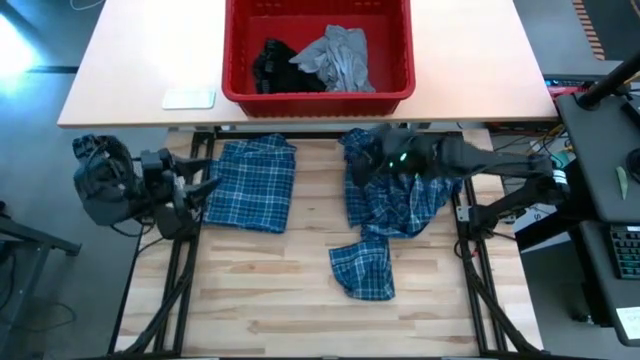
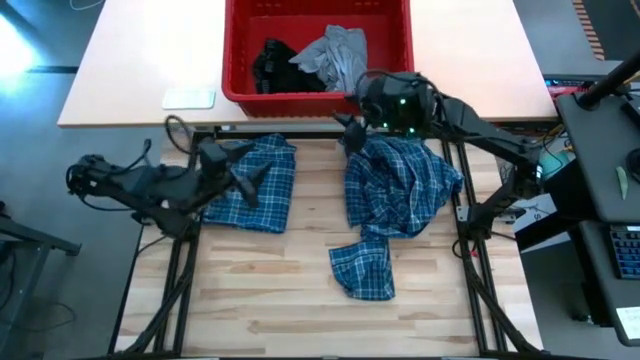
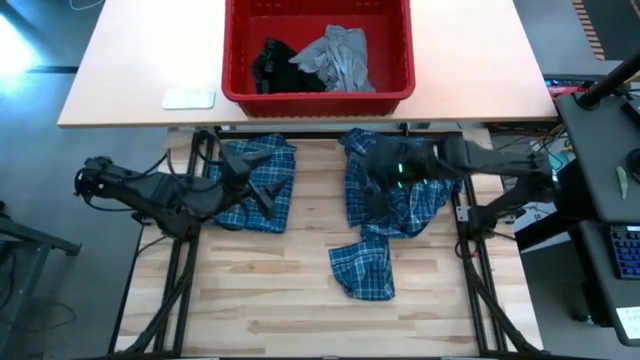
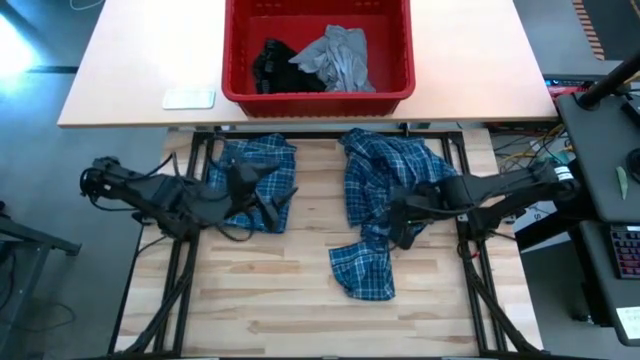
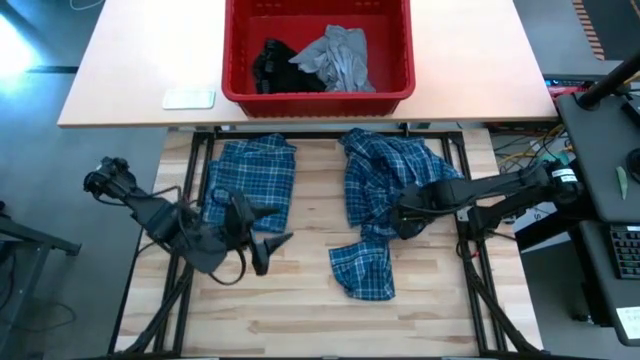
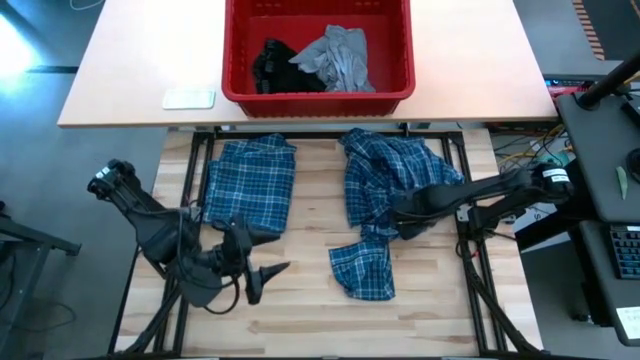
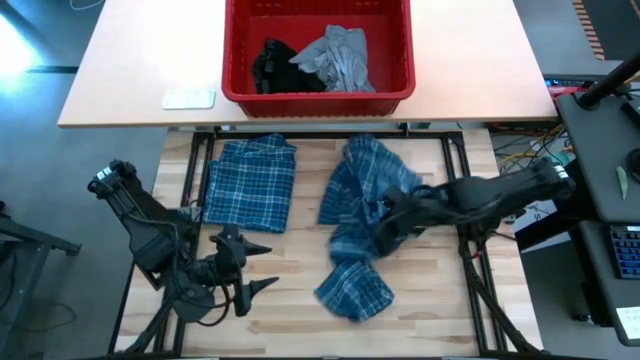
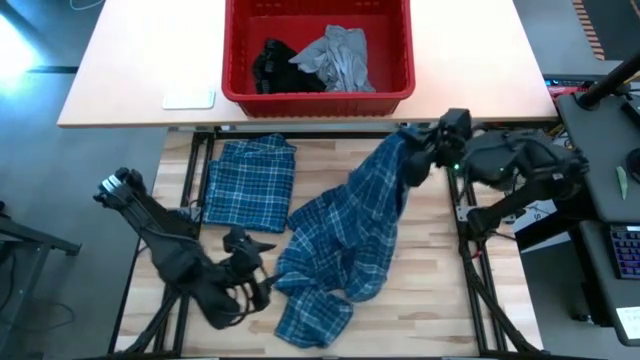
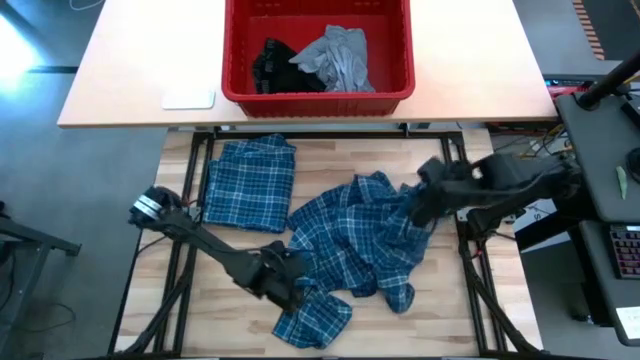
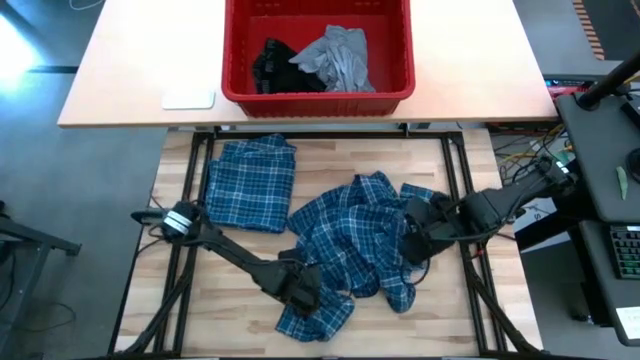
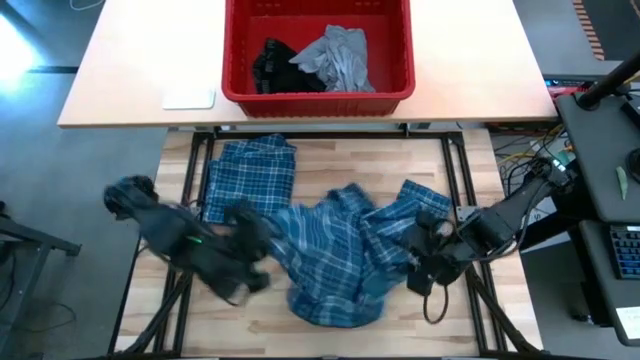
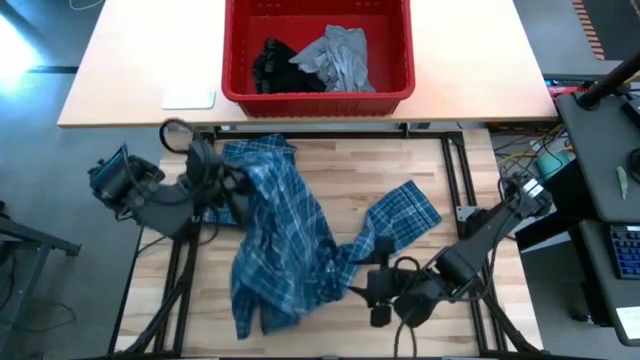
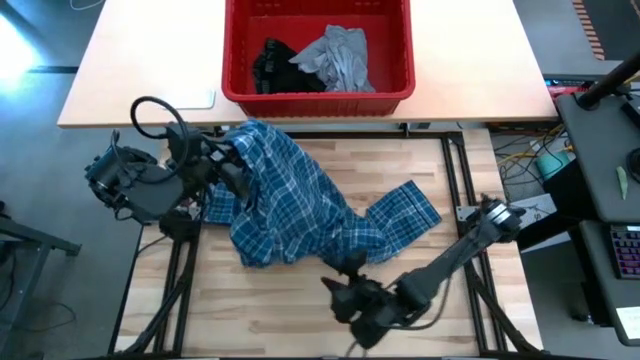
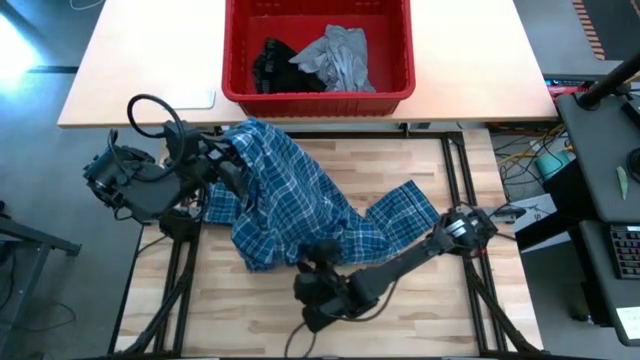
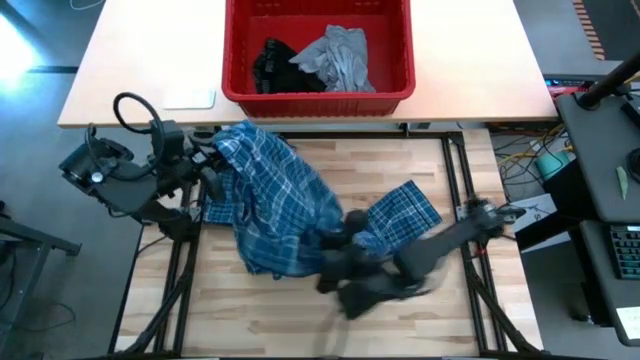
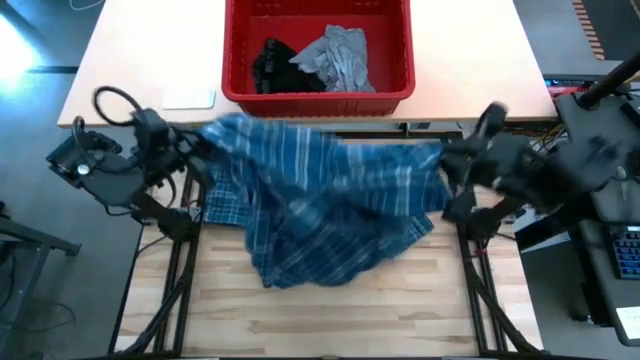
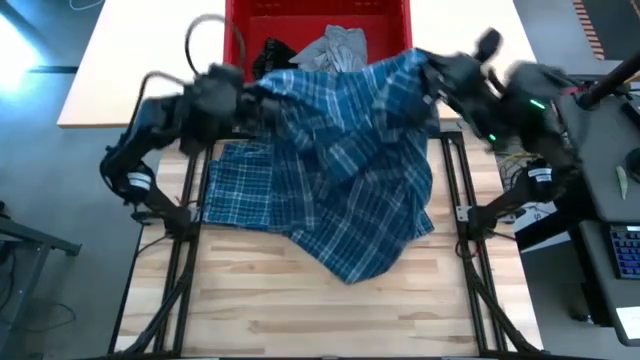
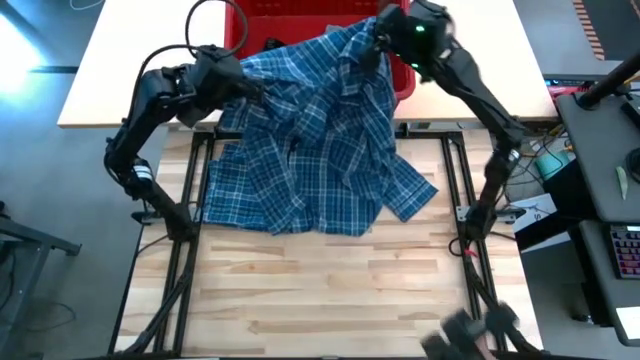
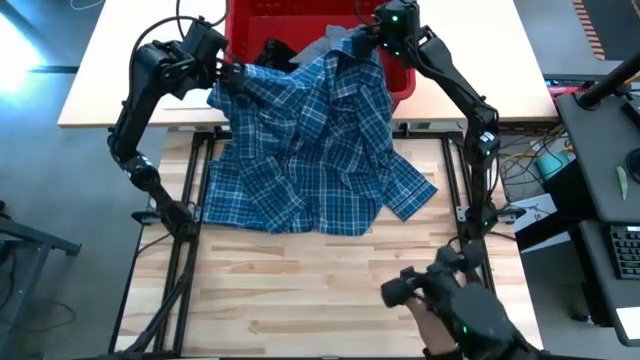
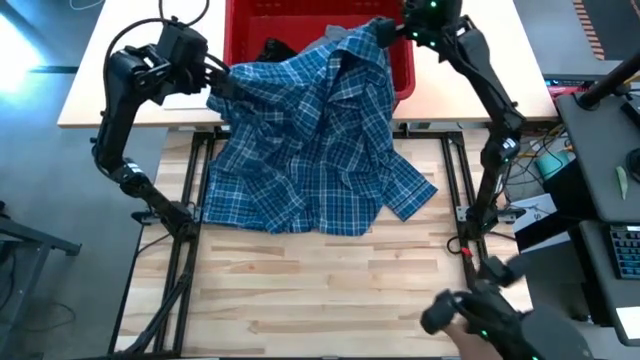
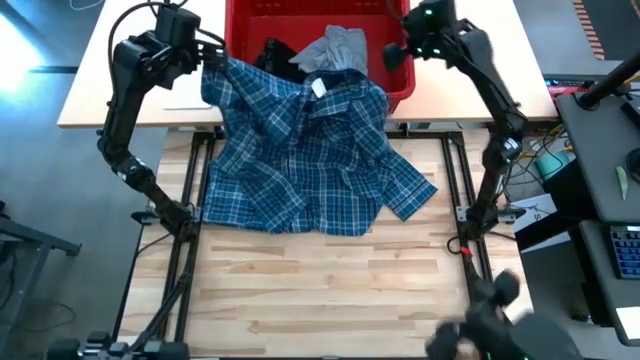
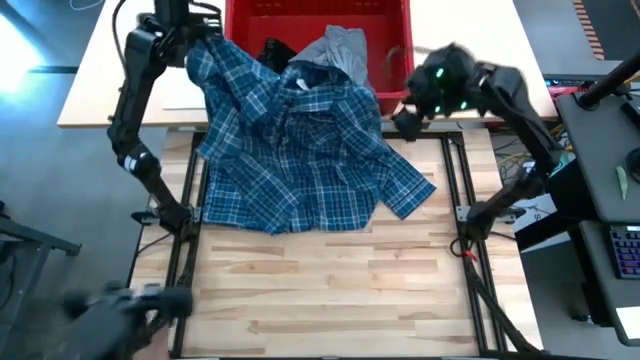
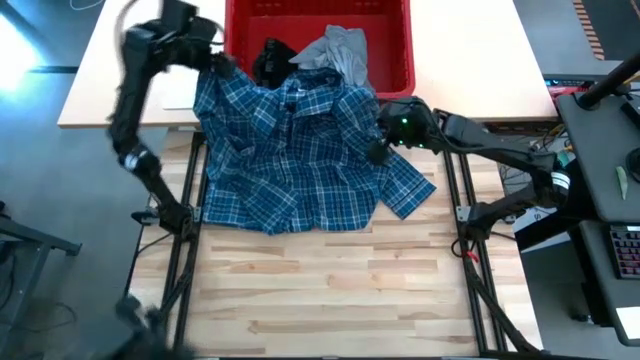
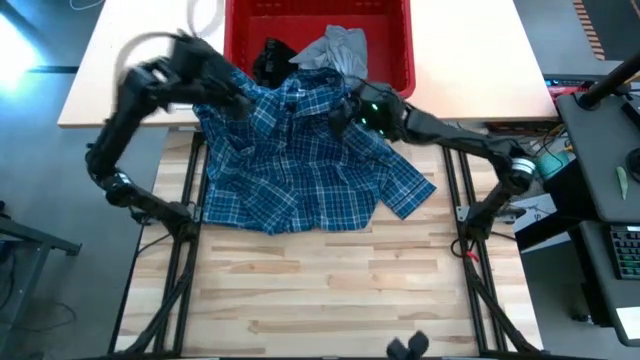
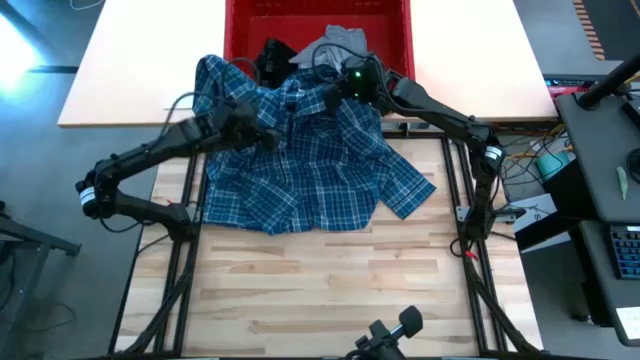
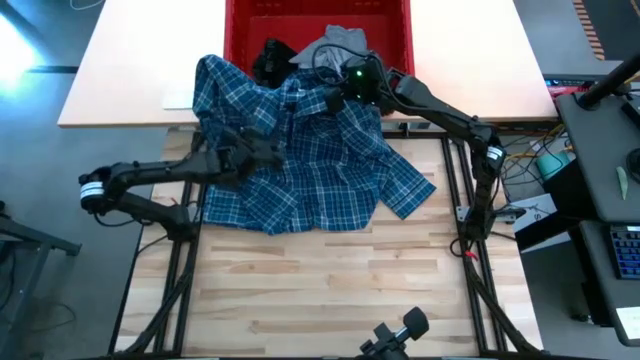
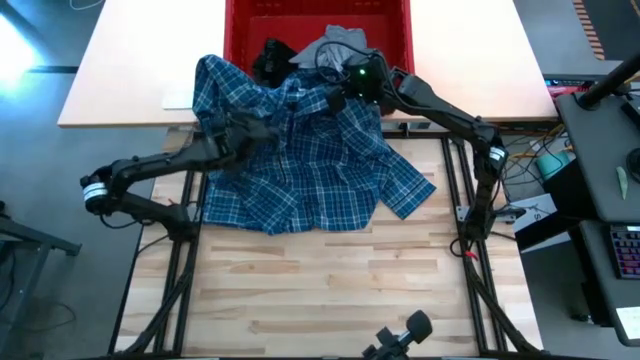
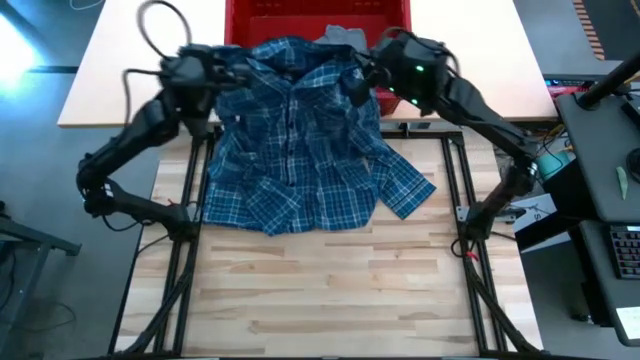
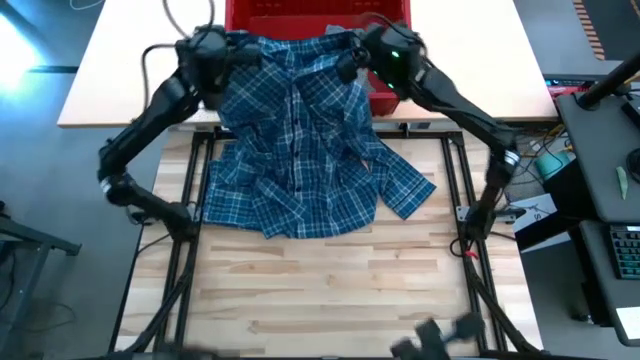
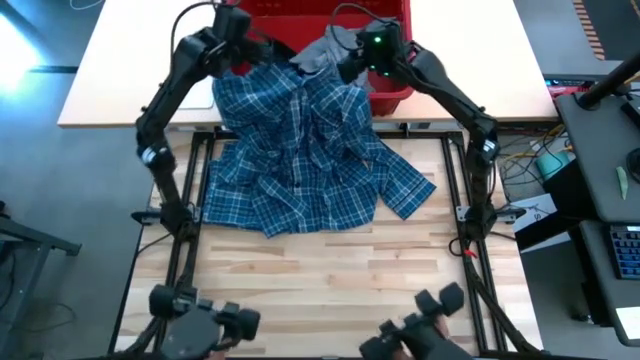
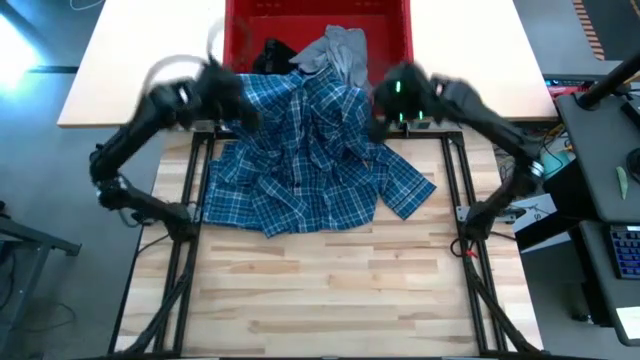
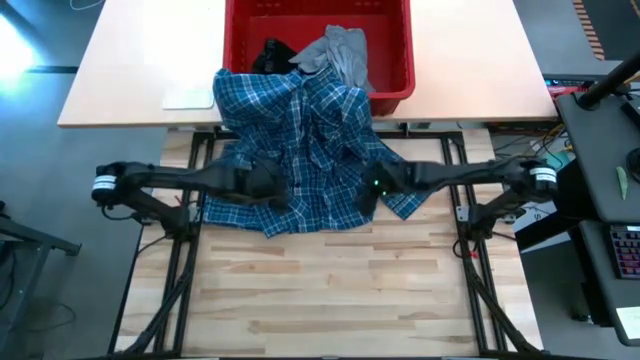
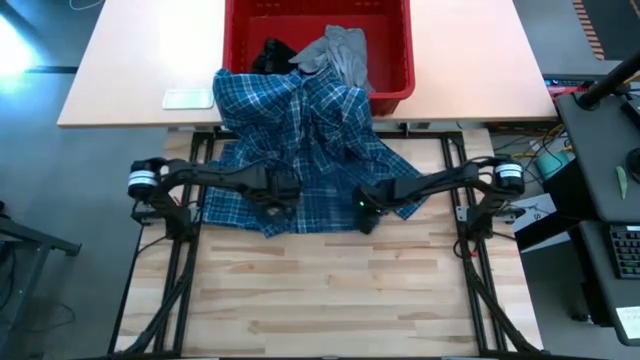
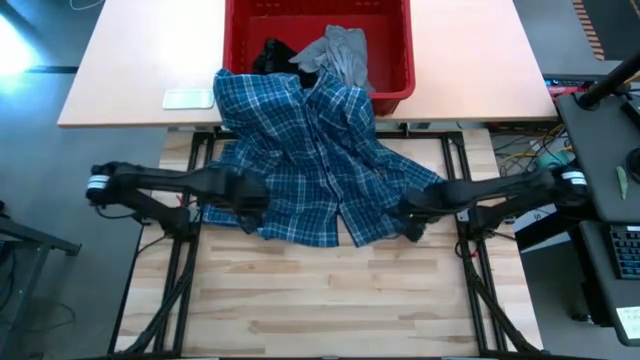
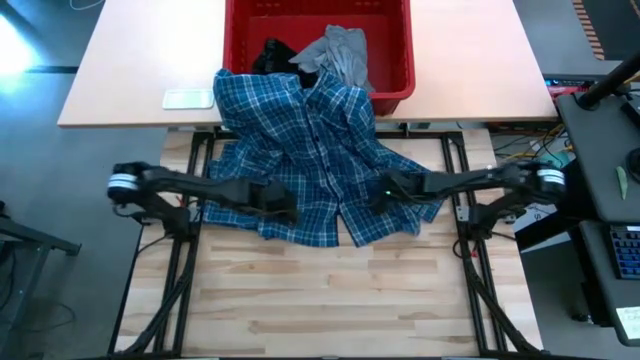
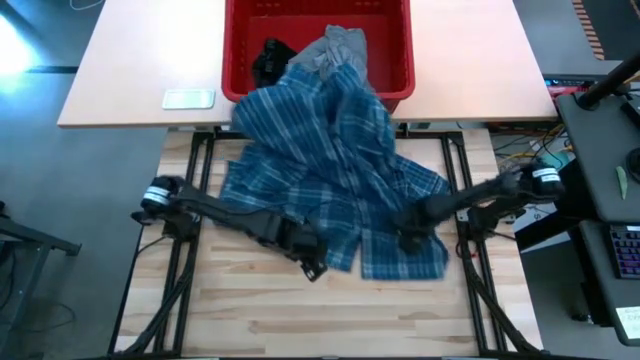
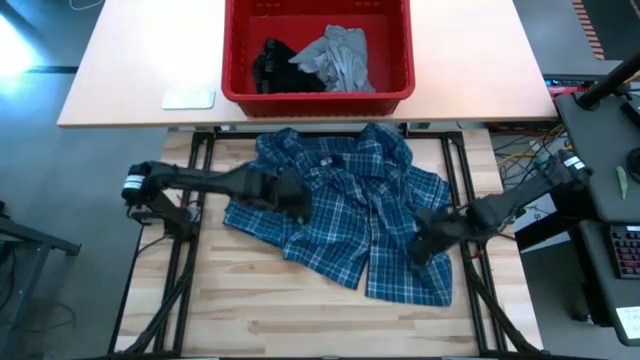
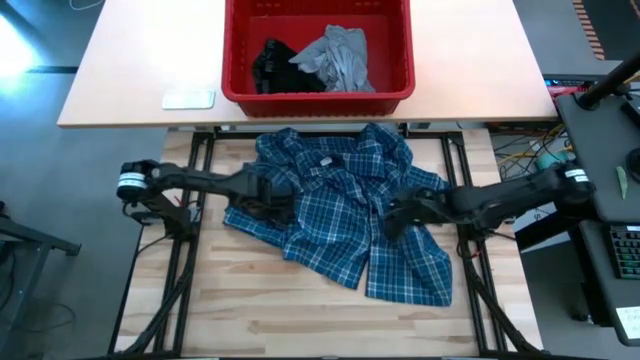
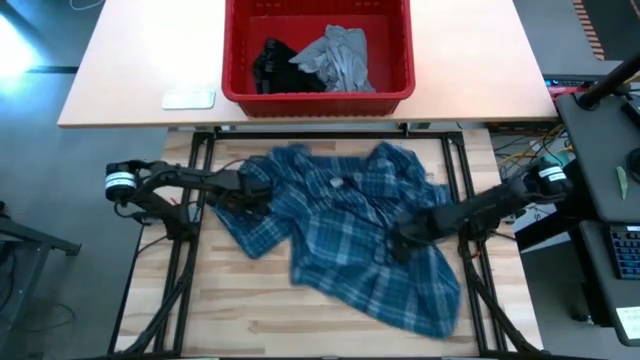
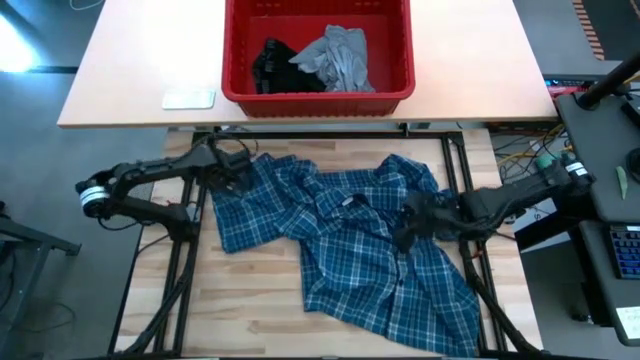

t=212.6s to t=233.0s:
Task: Fold Laundry from Bin
Fold the blue patterned long sleeve shirt
